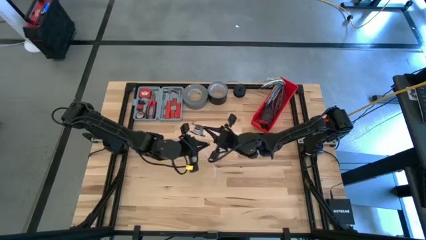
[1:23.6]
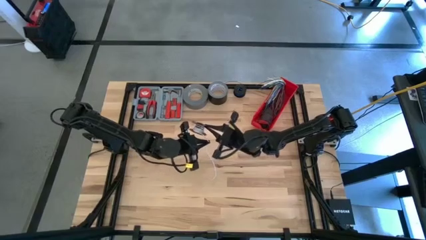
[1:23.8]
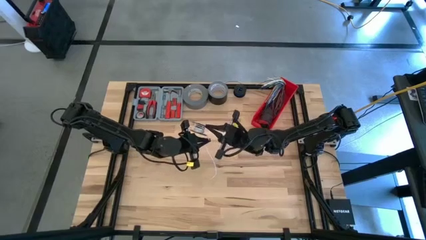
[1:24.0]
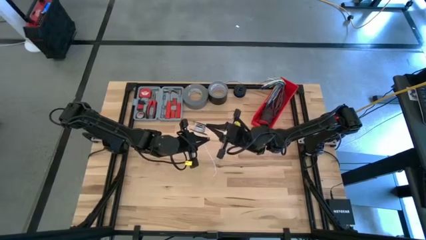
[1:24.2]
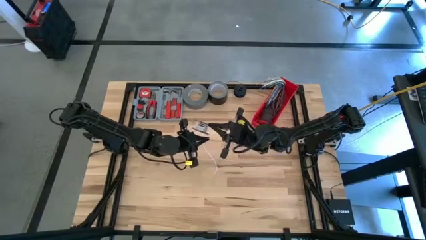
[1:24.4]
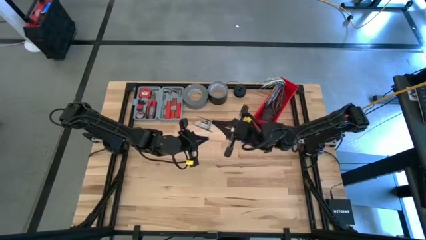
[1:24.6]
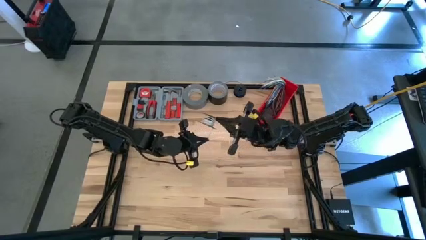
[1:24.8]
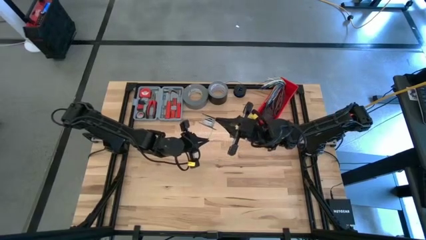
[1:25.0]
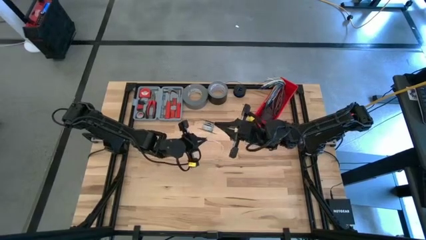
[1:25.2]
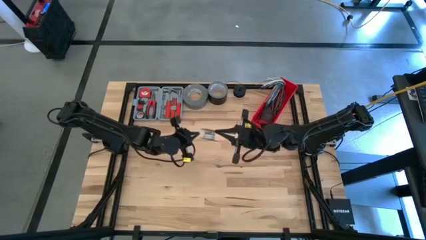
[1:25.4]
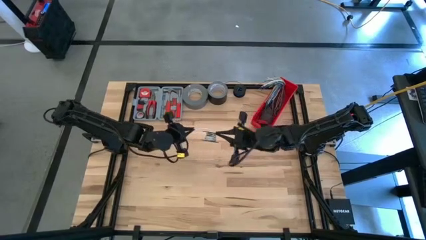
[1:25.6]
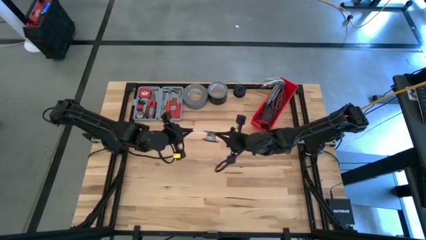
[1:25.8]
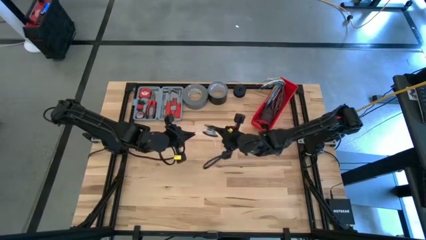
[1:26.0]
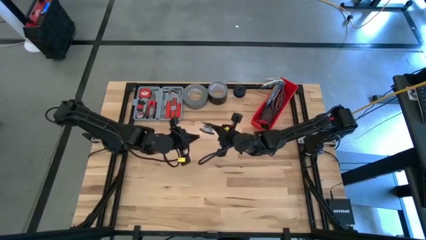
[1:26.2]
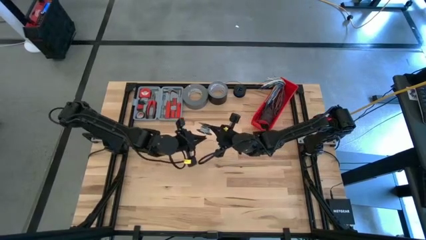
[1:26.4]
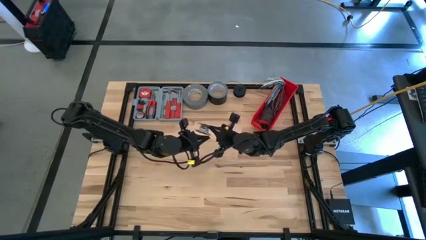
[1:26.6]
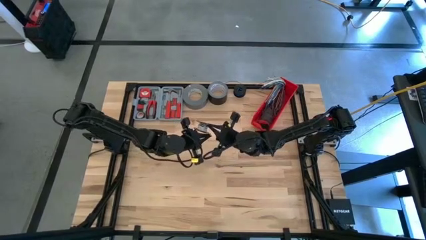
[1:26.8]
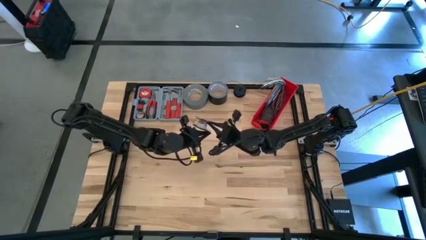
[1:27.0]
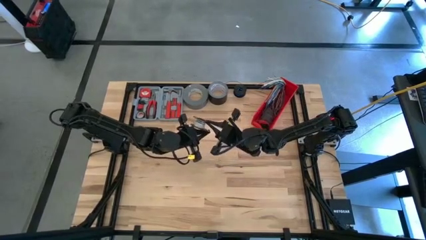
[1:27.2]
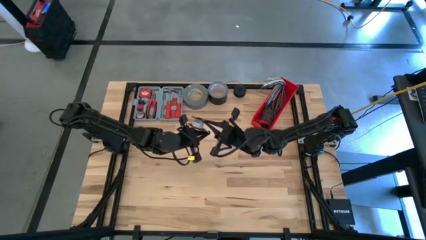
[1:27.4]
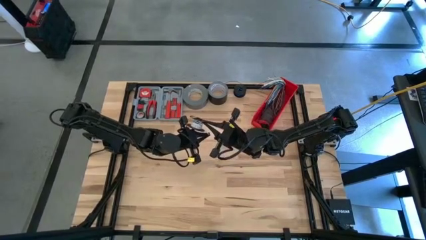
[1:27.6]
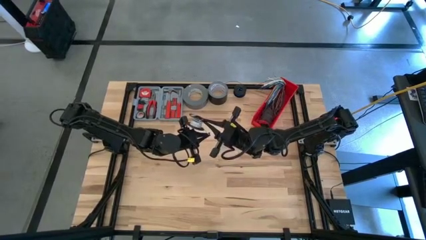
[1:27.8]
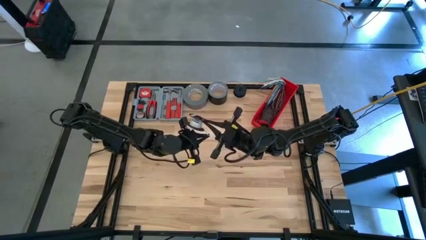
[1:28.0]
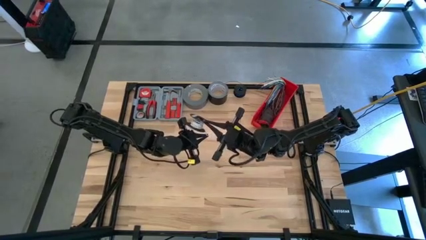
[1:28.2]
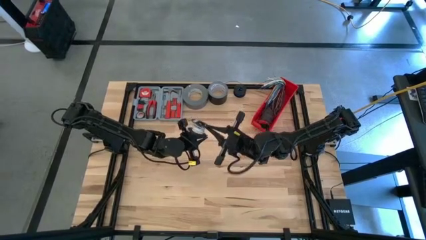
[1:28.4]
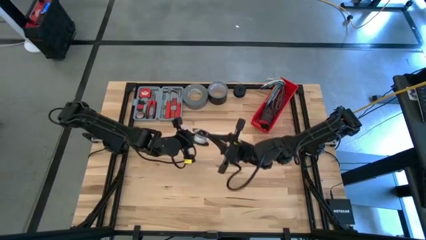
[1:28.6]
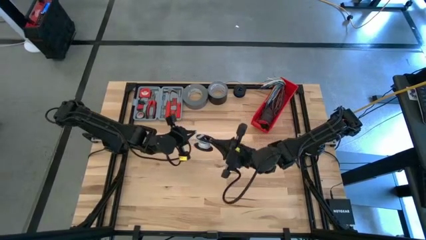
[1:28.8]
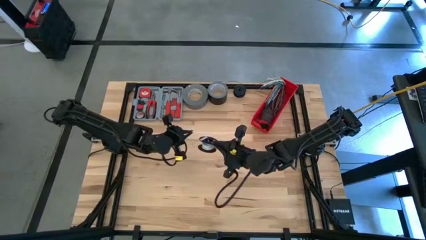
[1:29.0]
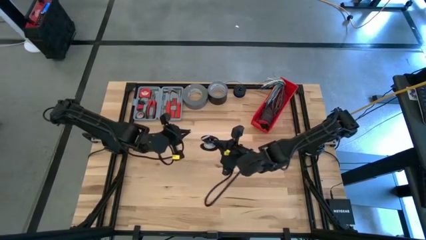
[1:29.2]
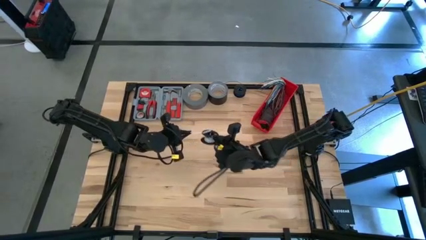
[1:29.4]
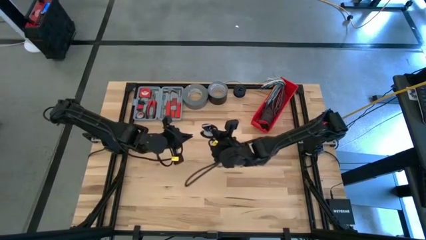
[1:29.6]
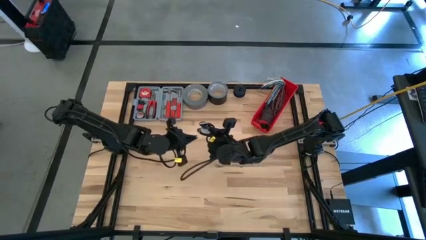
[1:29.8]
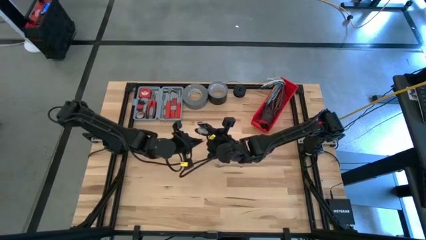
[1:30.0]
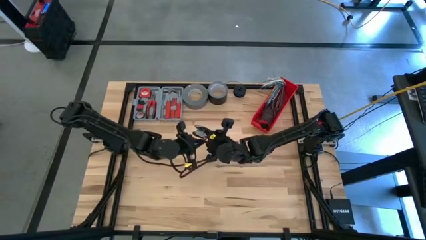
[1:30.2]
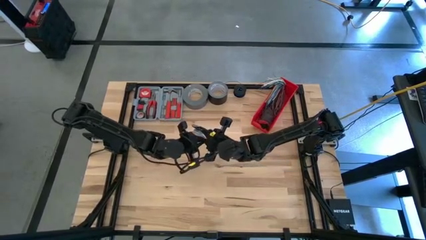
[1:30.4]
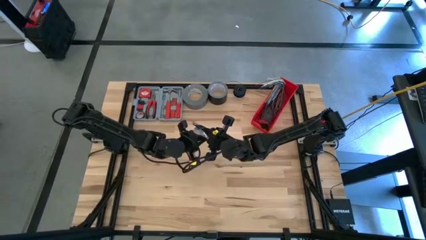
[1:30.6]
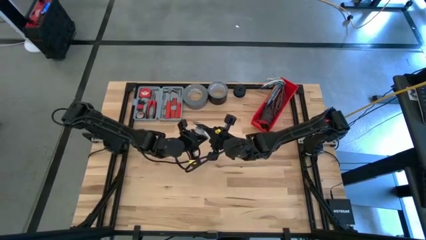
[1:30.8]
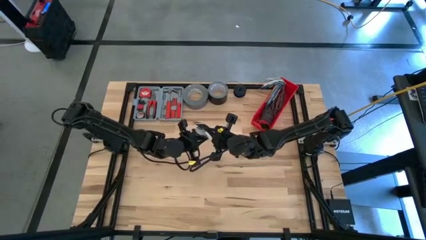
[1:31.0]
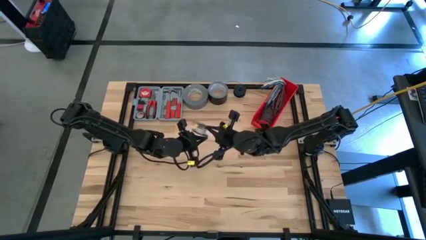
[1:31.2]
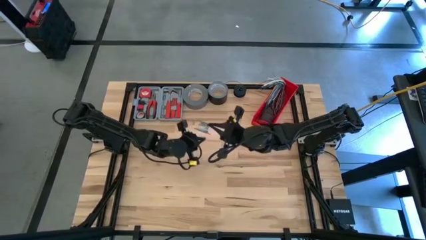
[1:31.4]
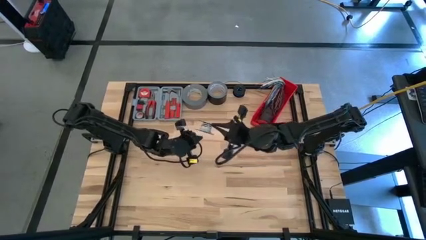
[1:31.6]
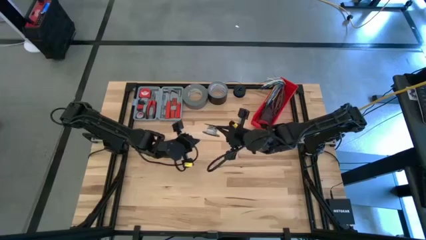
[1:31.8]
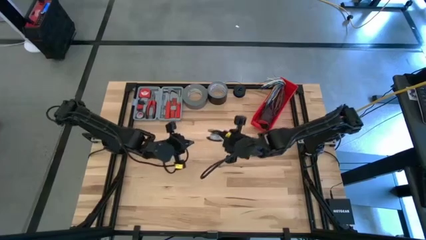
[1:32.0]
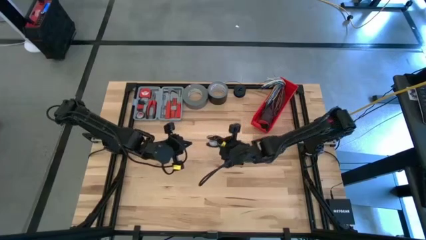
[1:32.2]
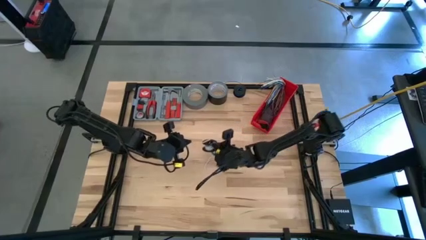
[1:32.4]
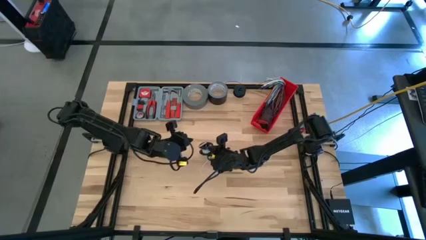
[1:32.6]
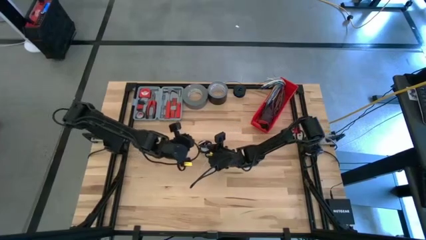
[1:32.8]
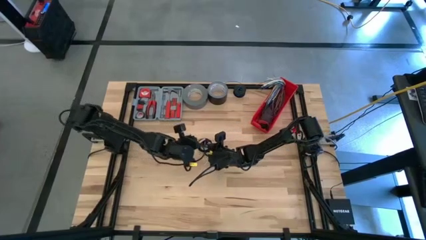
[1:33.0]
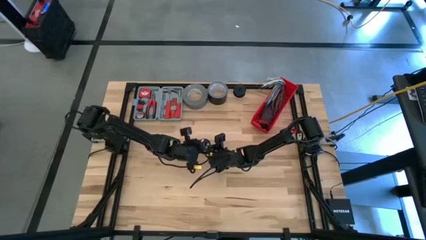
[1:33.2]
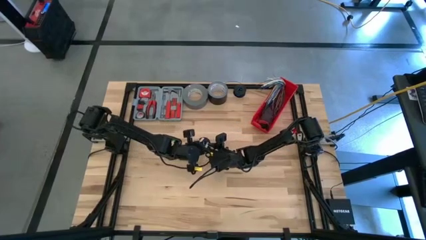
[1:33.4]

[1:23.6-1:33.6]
Task: Coil cords
Coil the white wire onto the spool

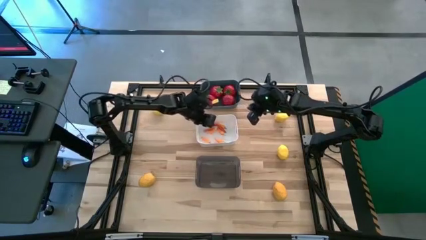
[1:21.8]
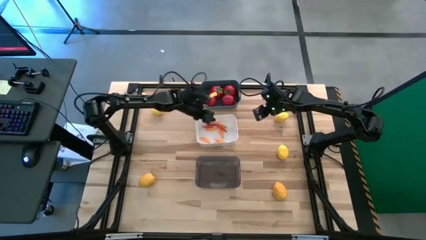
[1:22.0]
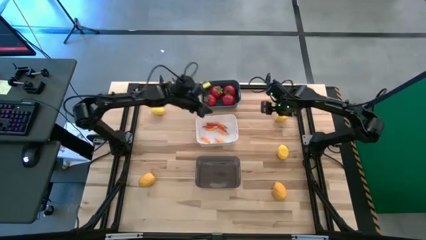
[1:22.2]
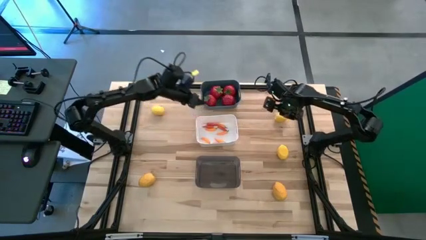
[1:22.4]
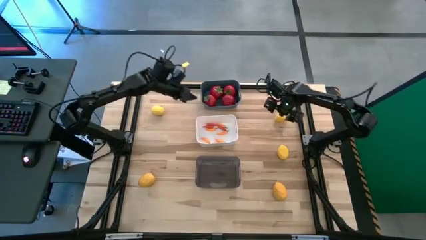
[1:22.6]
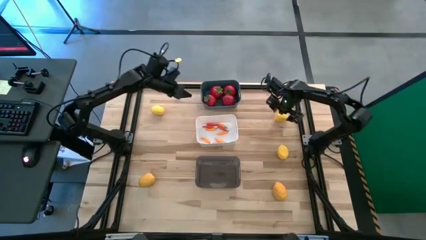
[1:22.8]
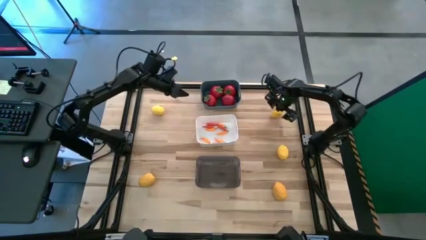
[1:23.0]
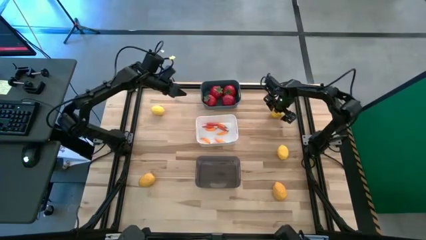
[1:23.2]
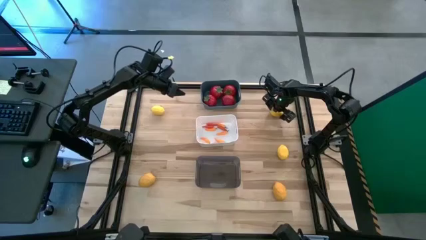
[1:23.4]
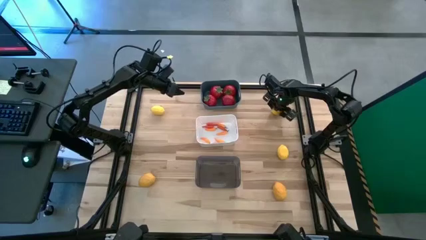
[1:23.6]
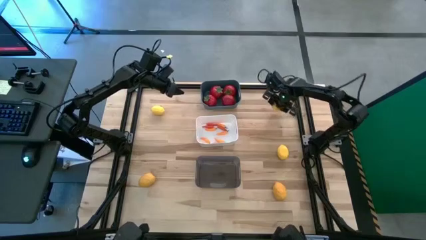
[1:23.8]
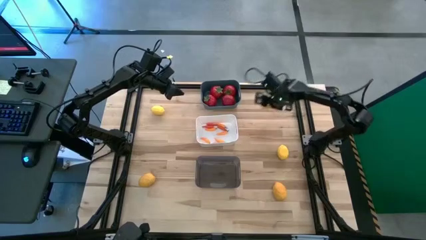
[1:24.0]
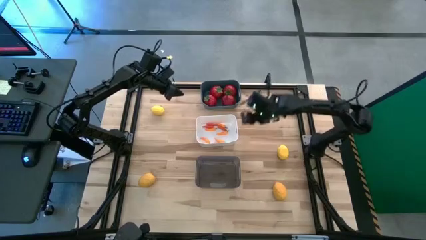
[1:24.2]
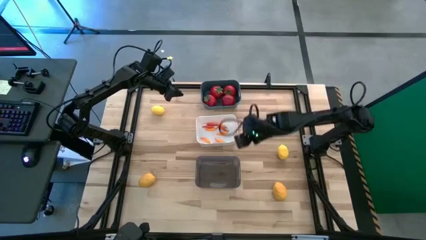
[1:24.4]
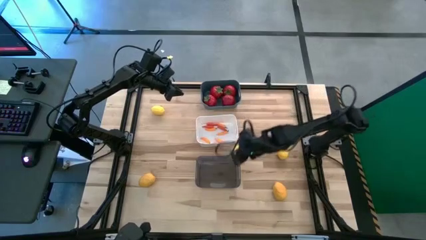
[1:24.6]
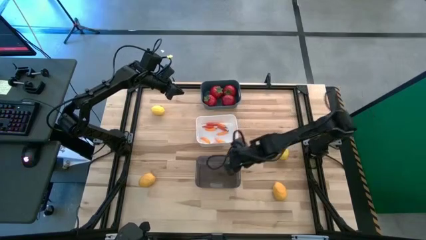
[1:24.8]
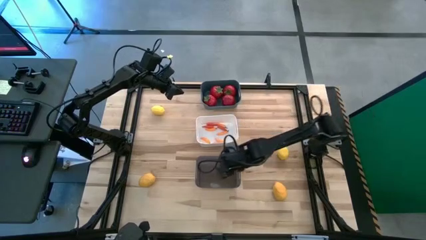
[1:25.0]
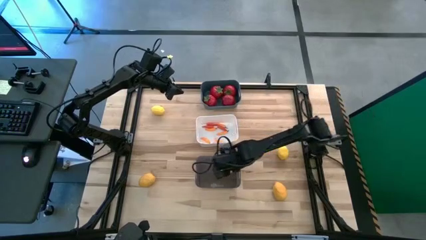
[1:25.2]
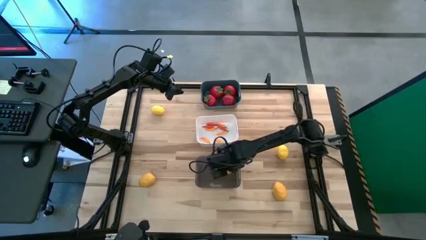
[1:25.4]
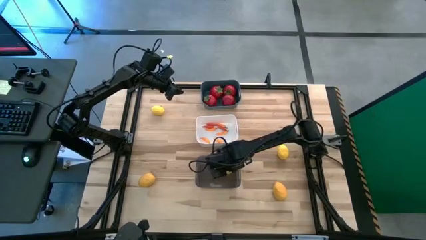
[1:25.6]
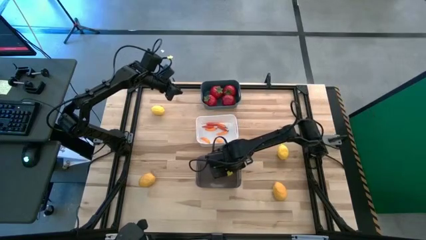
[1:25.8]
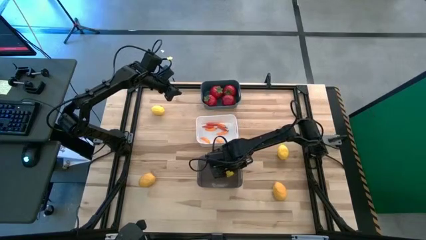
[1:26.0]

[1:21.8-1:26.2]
Task: Sort produce into baskets
Put the yellow lemon into the black bin
